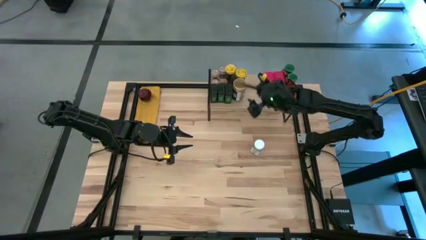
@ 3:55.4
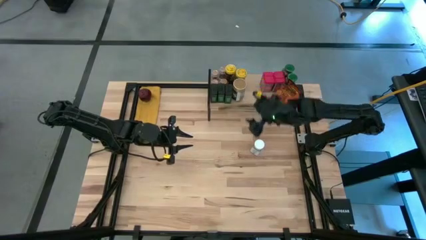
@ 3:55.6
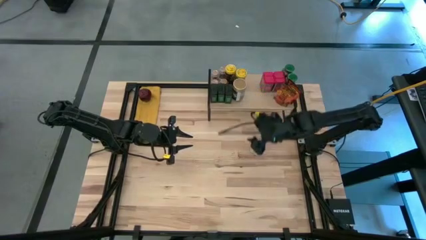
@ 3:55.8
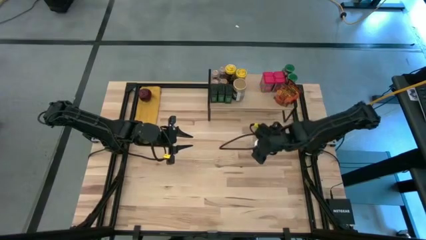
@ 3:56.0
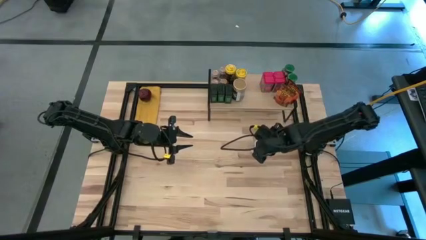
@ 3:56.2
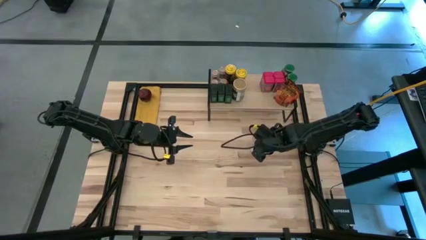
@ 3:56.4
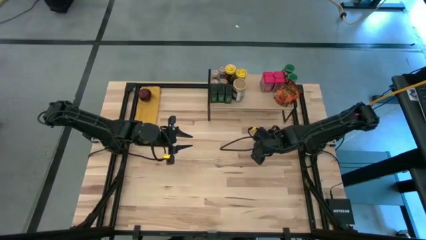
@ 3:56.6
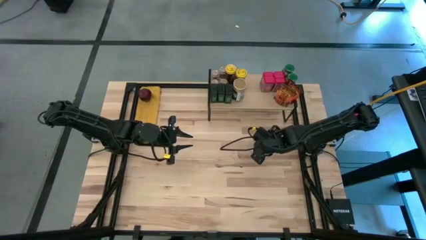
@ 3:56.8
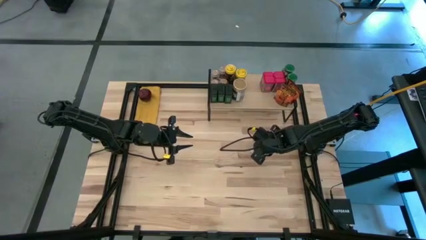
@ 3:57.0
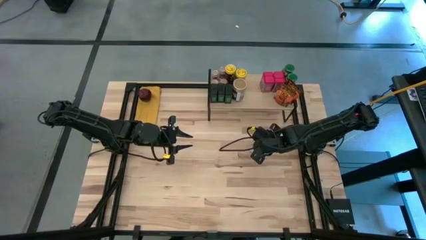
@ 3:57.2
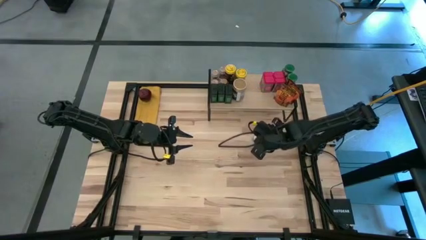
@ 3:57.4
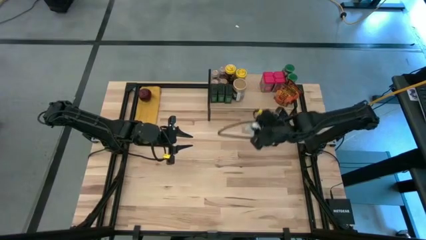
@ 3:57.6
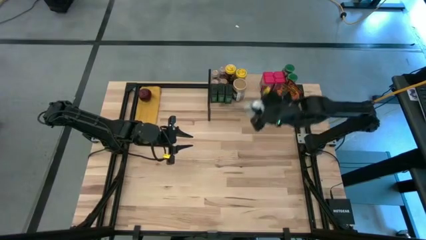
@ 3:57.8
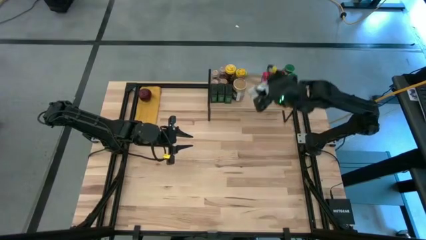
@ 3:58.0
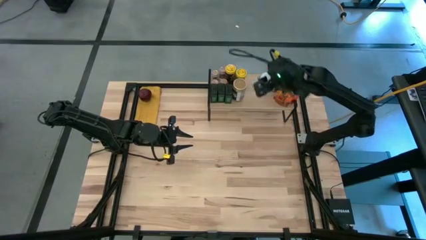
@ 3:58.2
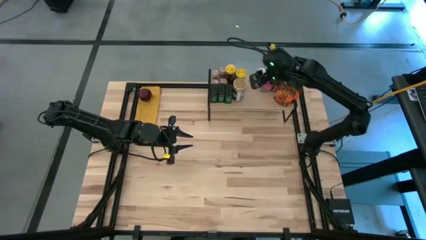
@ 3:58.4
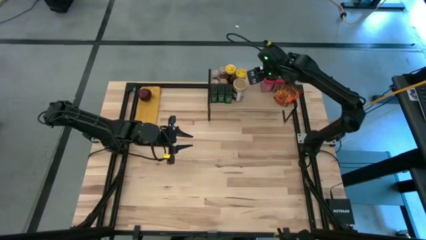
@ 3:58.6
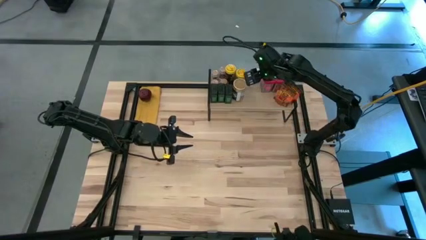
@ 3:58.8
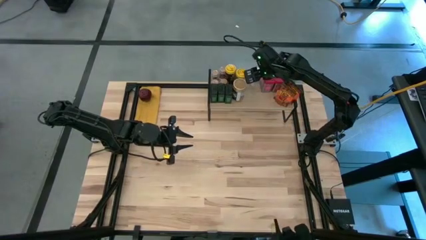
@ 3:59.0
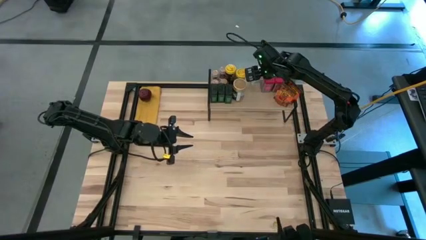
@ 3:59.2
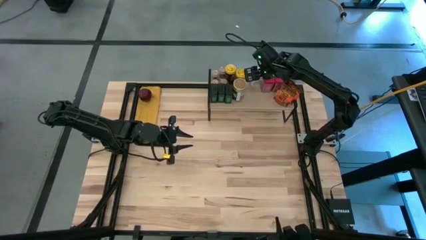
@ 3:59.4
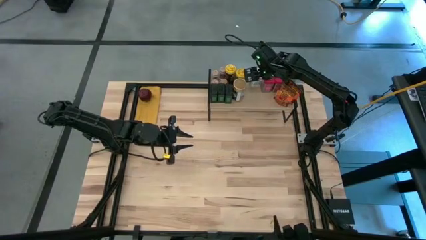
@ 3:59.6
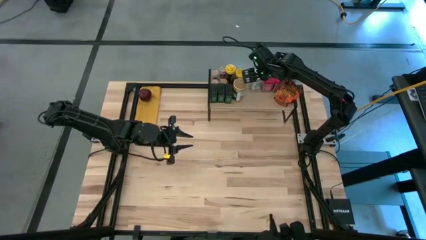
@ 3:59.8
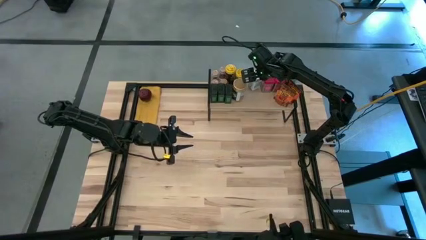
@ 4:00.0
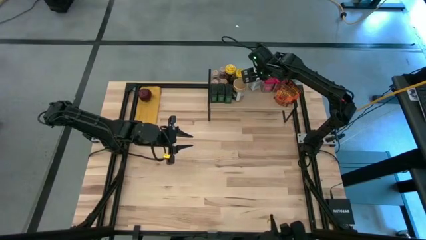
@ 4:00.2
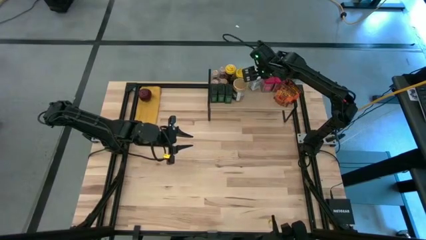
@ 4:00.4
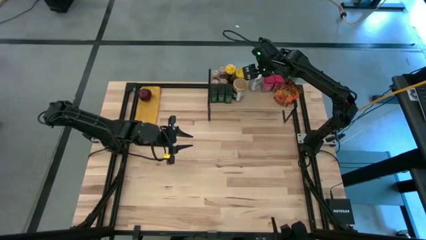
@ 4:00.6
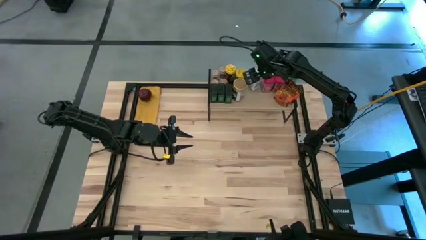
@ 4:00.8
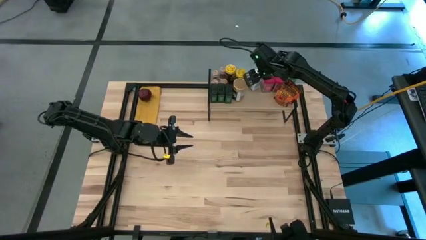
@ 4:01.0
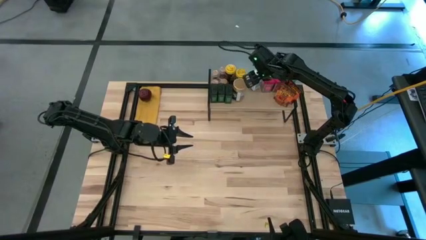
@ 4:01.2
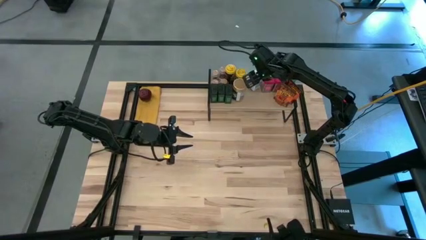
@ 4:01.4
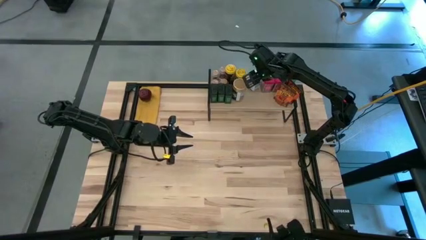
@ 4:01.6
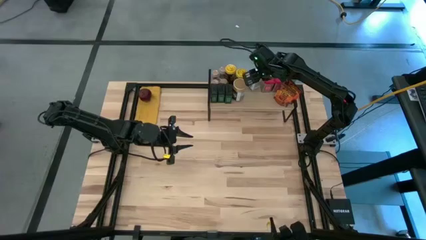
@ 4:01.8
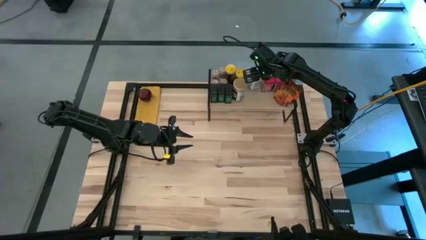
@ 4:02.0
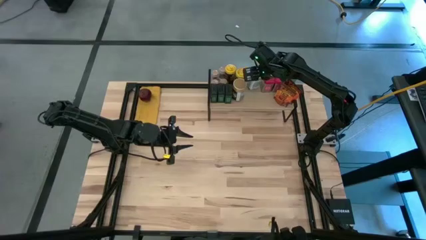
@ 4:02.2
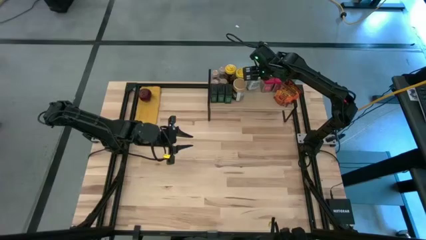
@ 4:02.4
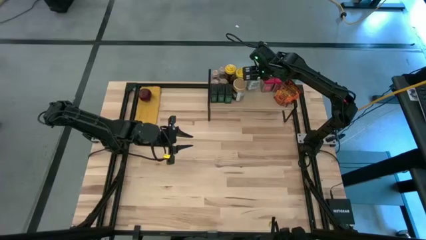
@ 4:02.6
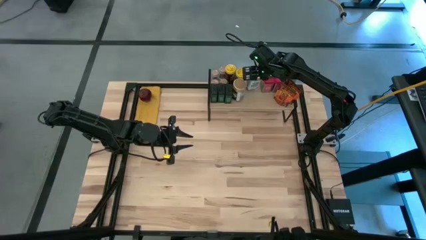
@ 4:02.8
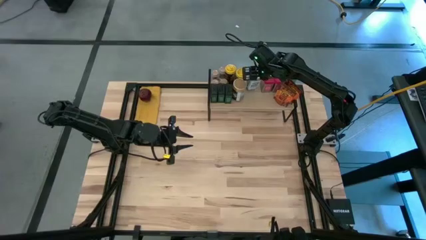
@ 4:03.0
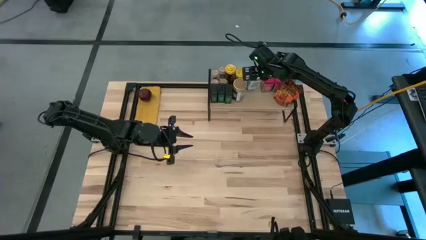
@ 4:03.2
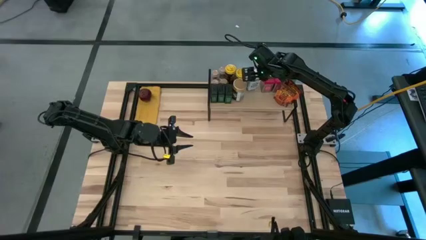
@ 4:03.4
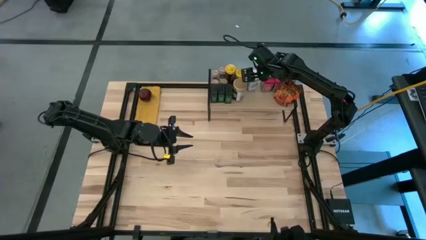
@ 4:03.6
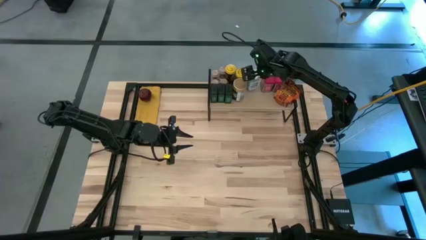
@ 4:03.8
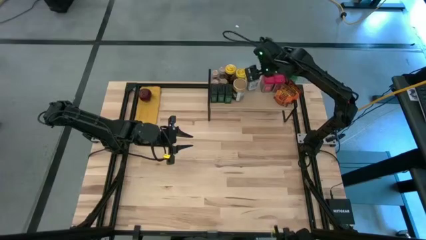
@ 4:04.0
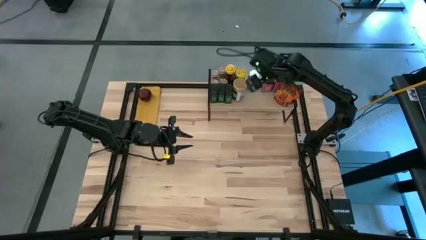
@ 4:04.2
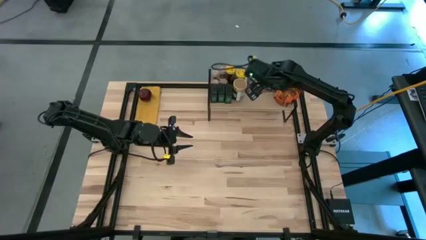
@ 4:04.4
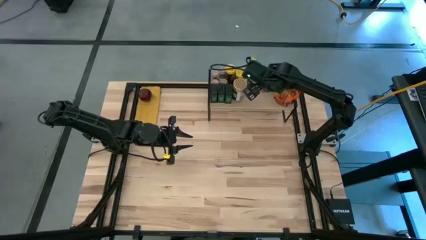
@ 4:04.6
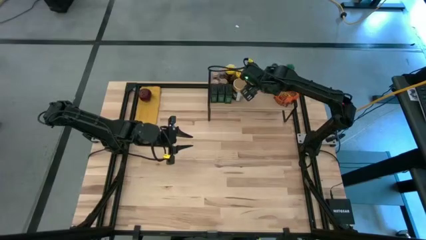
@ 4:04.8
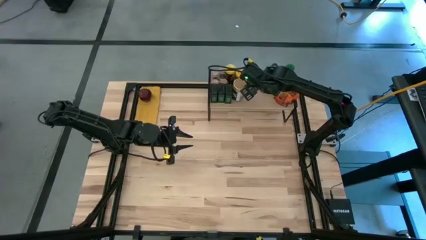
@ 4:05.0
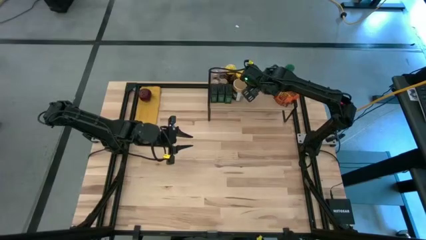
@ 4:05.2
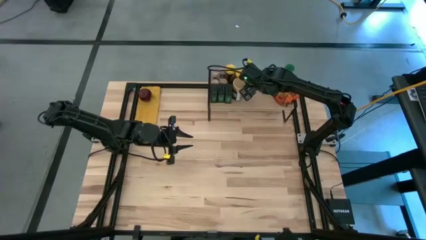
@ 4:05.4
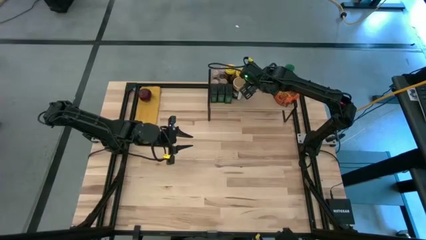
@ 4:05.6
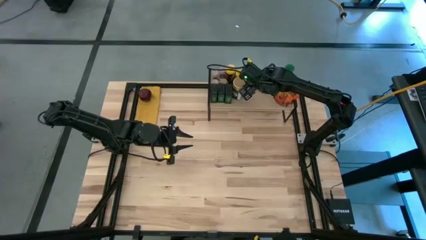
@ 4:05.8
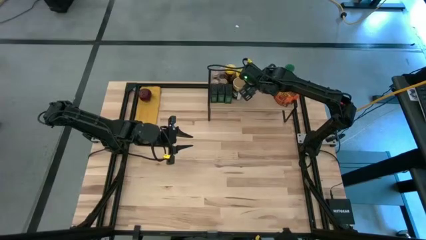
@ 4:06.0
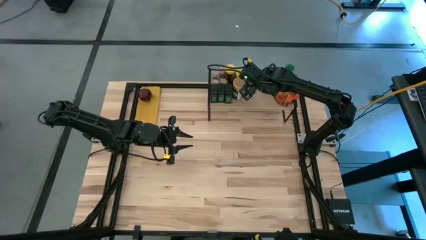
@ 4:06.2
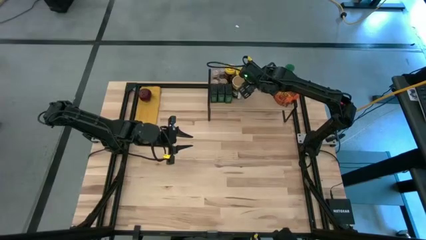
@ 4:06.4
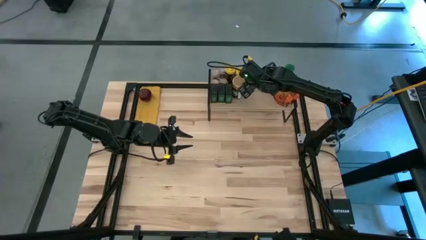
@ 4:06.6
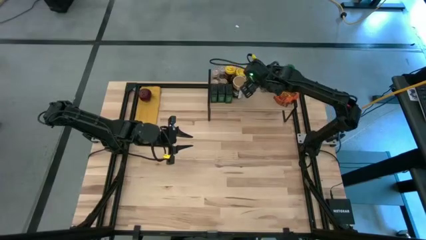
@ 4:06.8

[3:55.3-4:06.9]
Task: Shelf spices
Put the white seasoning bottle on the shelf

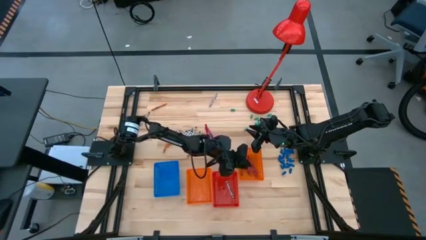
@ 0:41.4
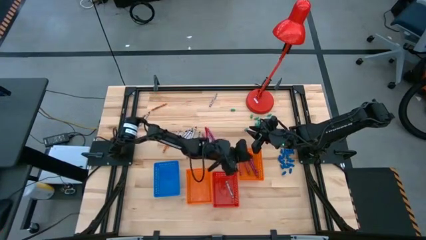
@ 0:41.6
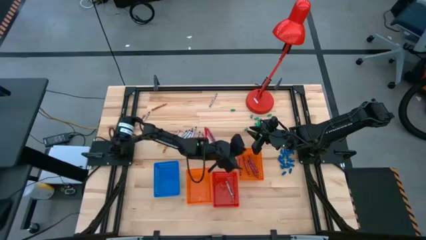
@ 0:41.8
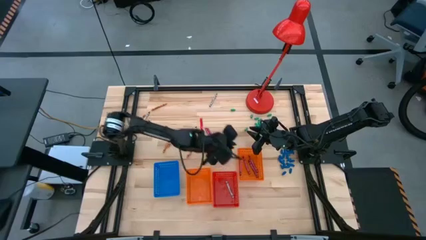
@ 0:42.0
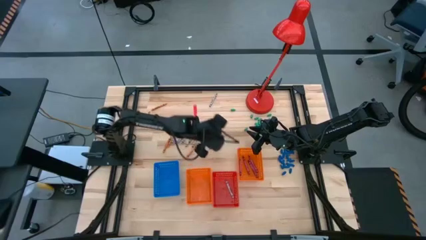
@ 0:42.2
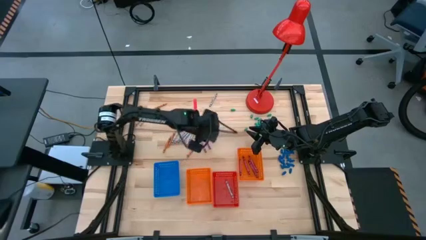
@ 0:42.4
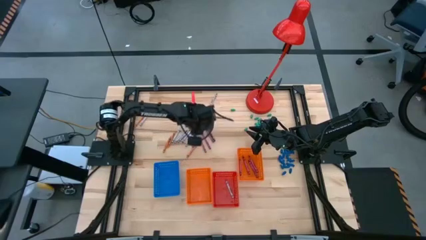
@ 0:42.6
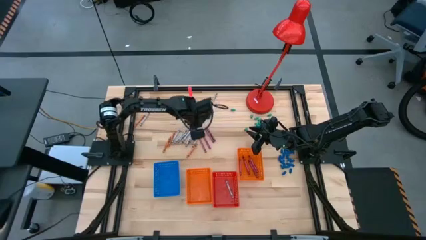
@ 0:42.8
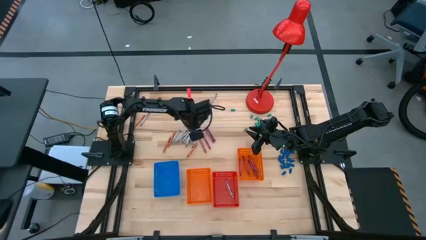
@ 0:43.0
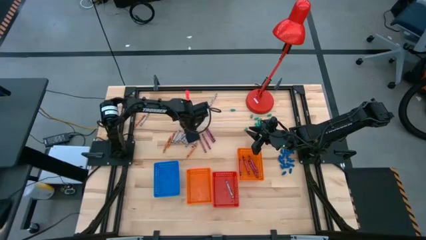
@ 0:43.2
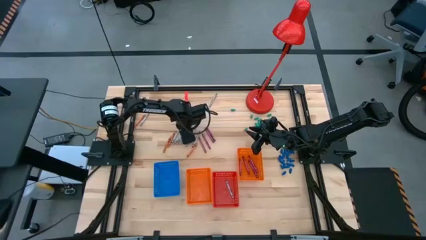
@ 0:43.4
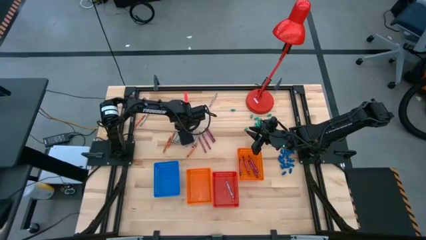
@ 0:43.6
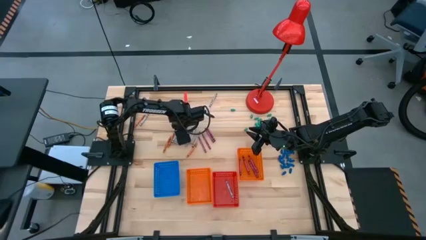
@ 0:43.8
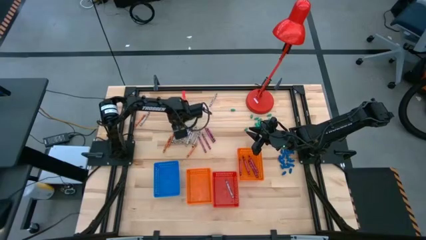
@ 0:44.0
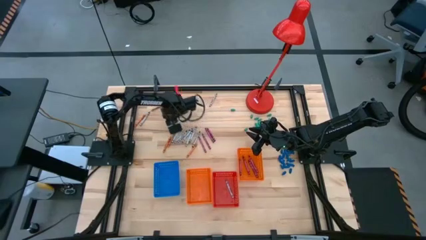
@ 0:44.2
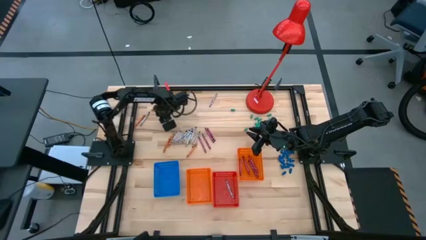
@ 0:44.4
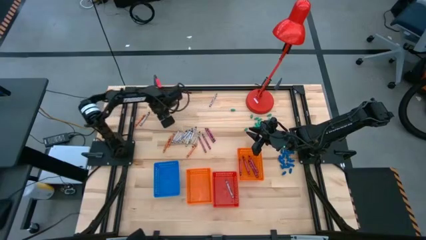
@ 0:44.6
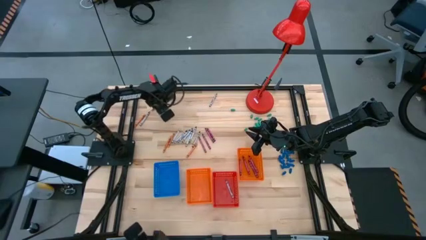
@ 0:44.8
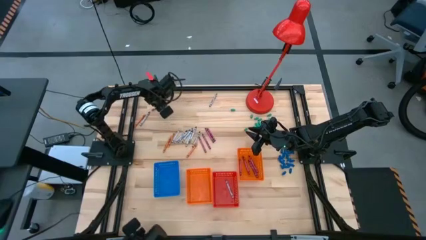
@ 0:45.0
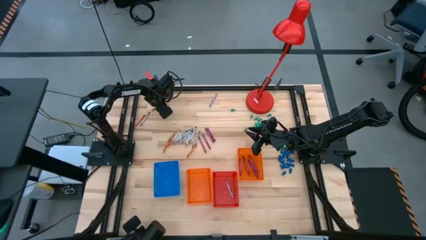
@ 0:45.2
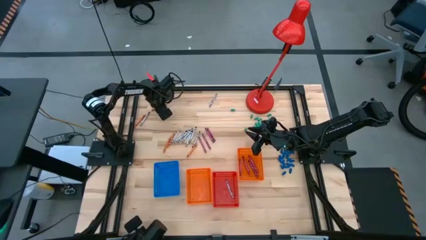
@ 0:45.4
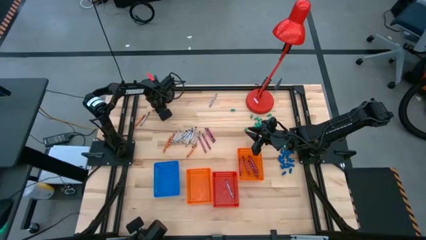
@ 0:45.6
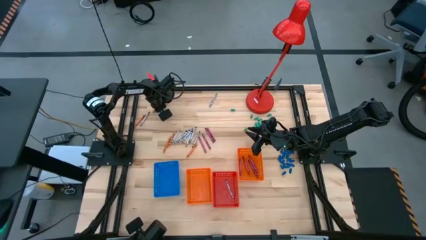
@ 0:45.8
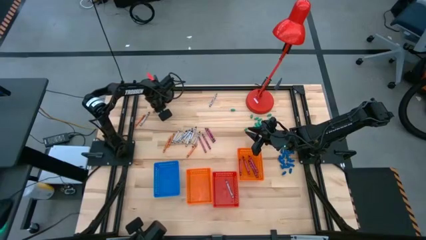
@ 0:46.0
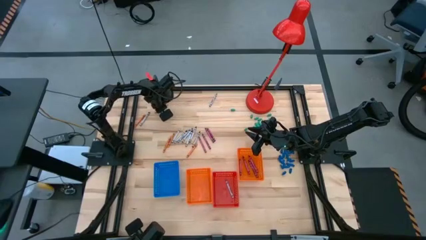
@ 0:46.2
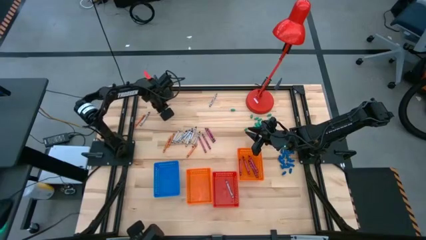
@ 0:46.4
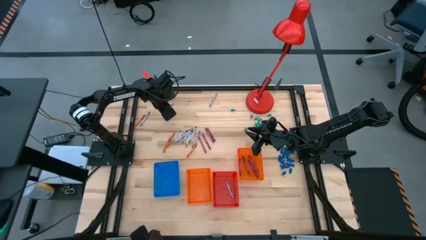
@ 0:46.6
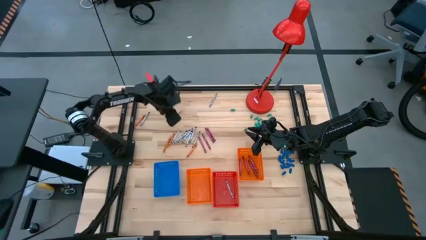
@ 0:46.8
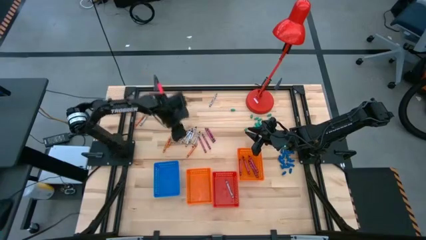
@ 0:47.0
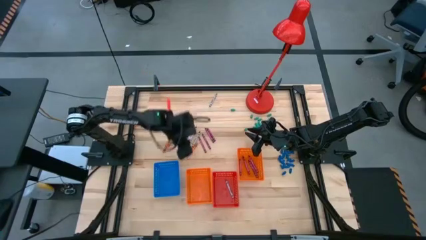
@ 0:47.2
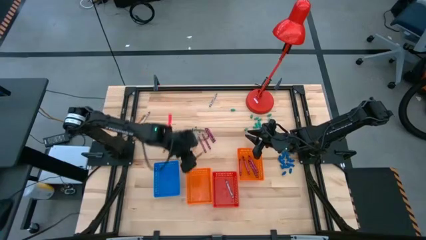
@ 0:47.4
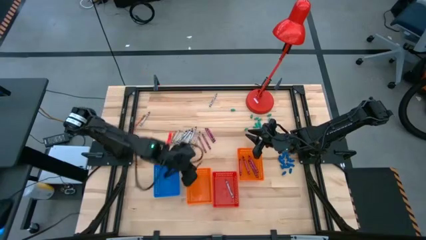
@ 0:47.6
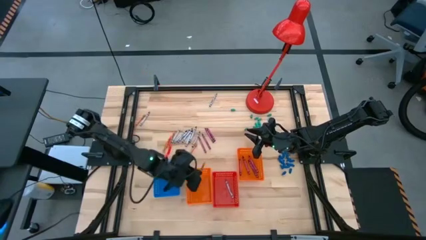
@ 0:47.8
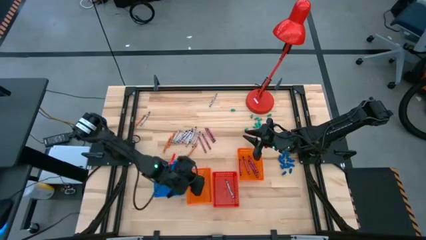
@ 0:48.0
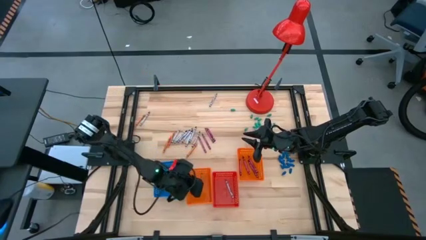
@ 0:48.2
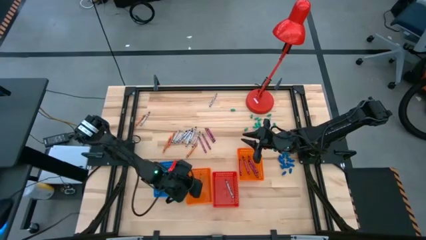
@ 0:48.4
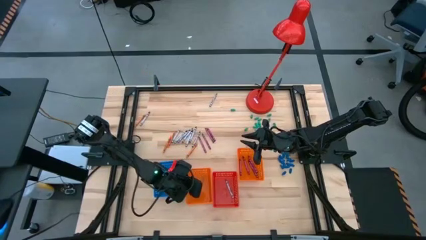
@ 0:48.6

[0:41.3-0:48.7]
Task: Sort crayons
Put the orange crayon into the left orange bin
